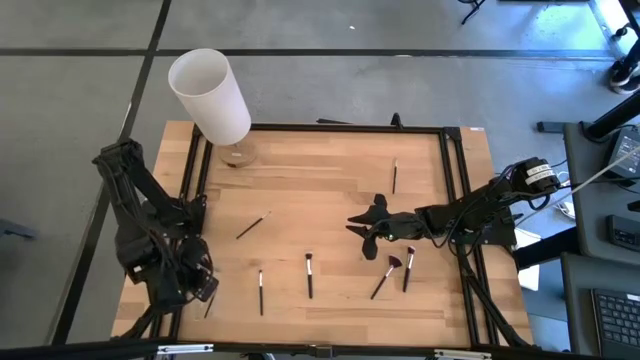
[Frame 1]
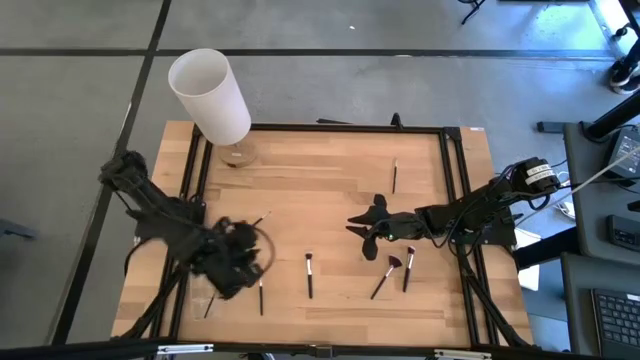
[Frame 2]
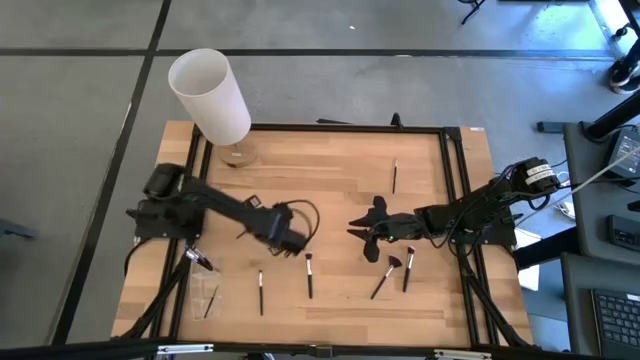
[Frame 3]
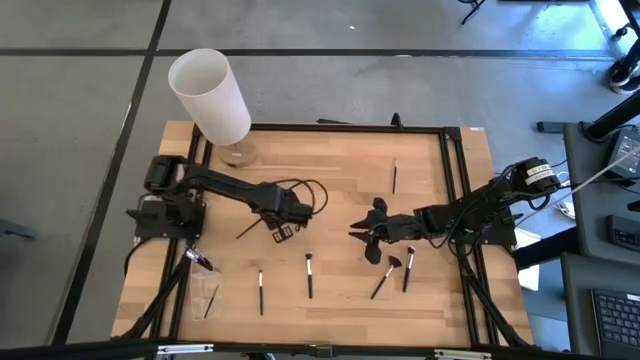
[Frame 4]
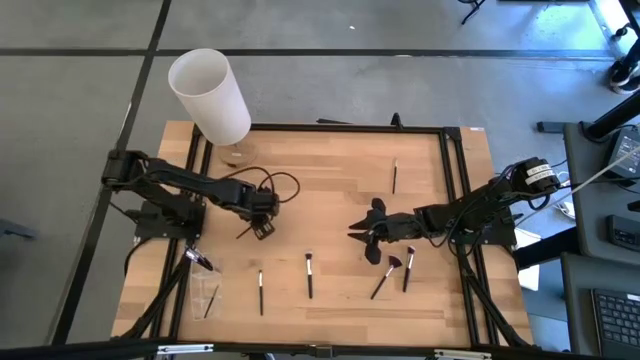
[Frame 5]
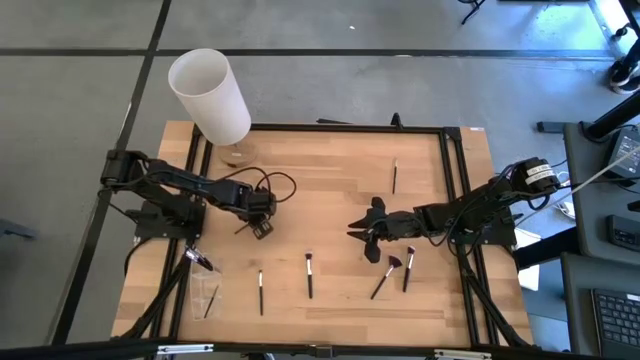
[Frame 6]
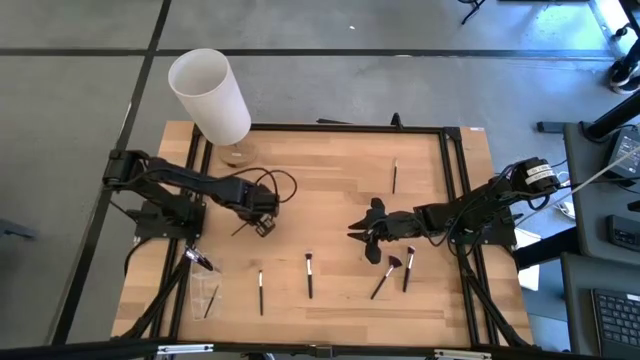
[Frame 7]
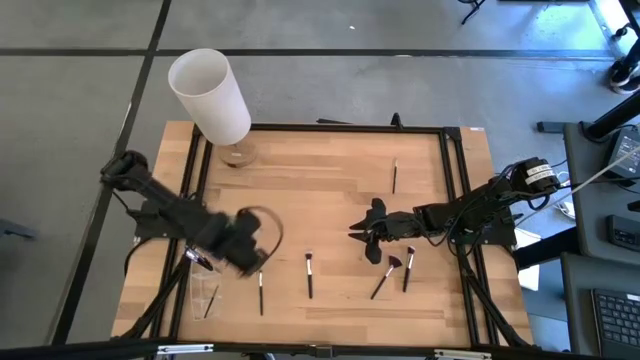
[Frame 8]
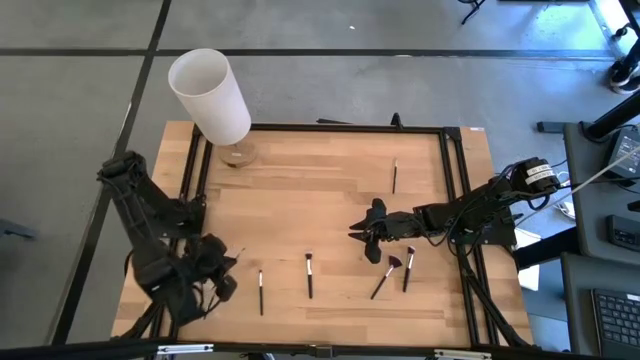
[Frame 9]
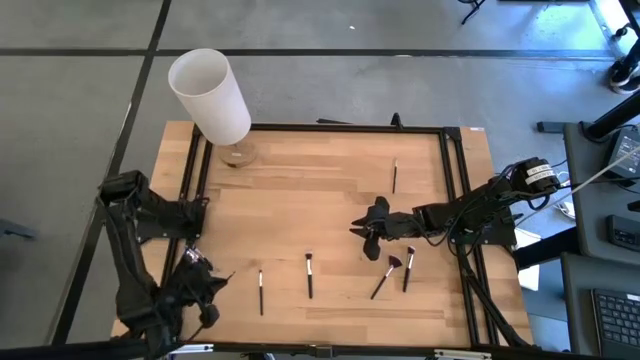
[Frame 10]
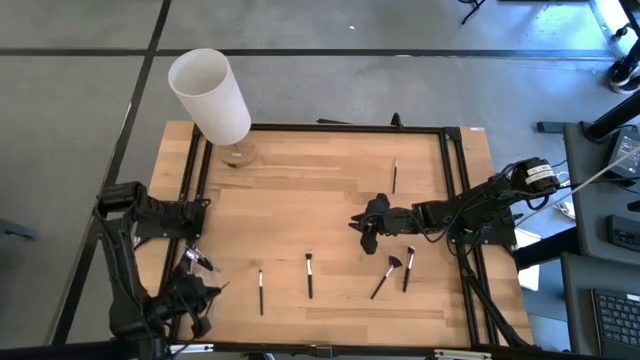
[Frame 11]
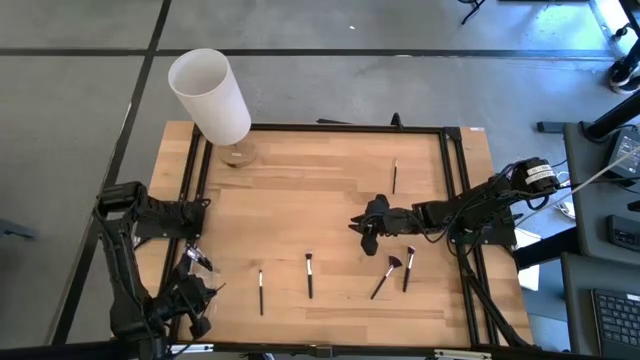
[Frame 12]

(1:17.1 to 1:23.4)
Task: Put items in baskets/containers
Put the eyeshadow brush into the transparent organizer

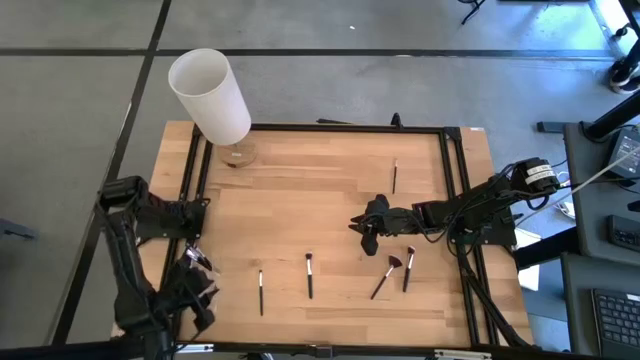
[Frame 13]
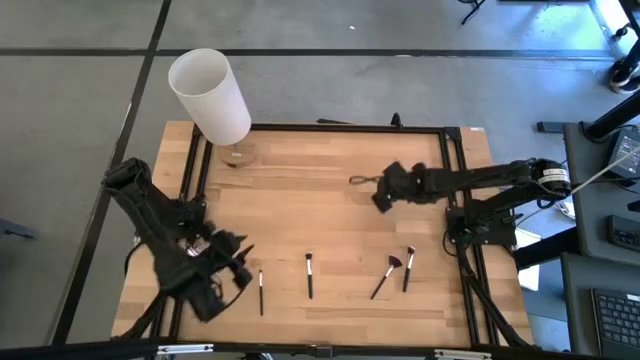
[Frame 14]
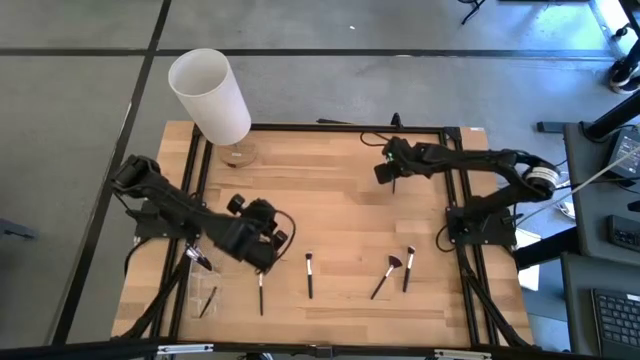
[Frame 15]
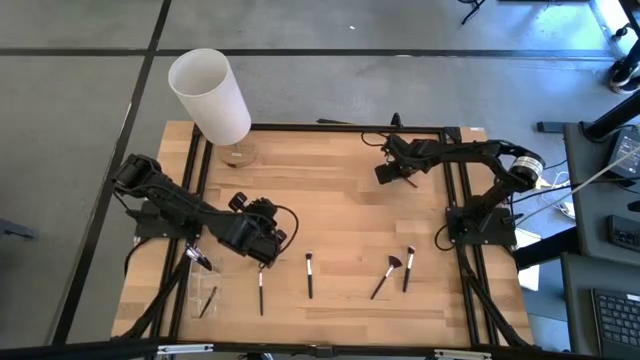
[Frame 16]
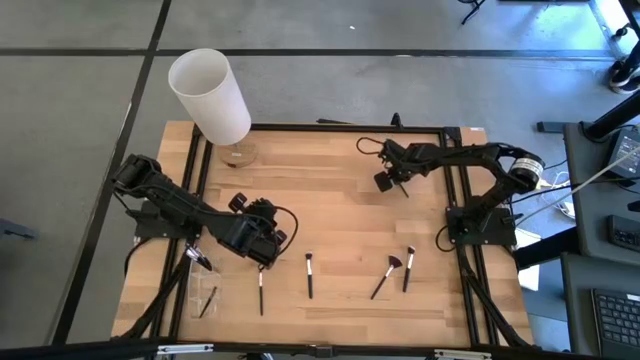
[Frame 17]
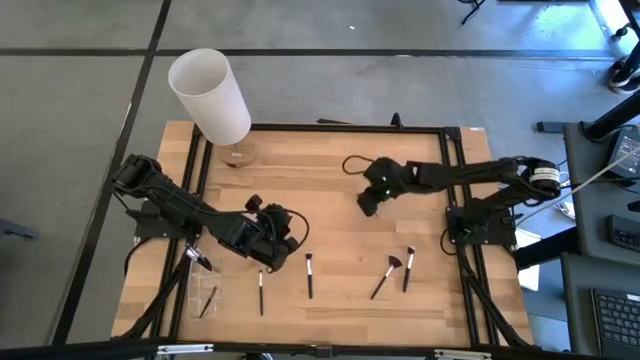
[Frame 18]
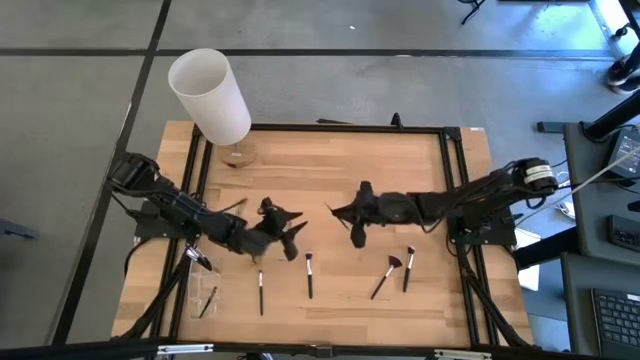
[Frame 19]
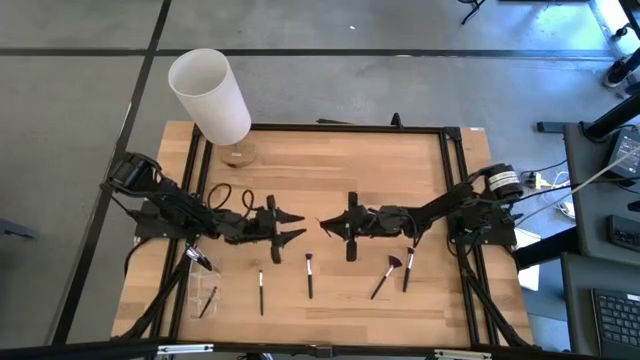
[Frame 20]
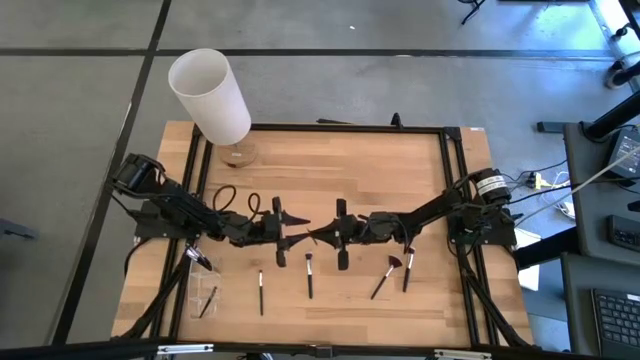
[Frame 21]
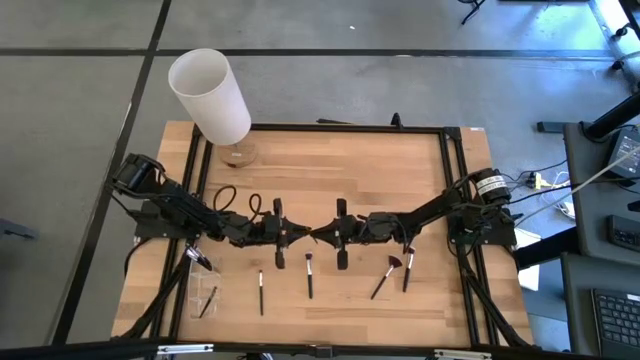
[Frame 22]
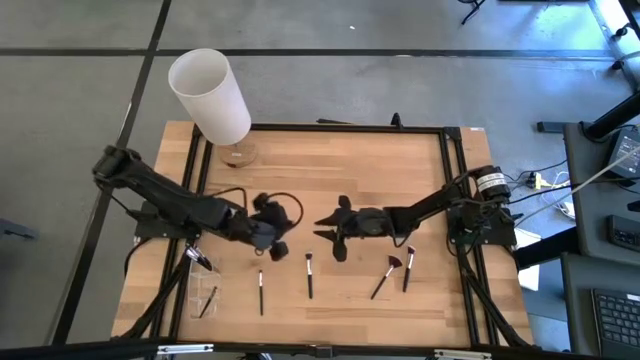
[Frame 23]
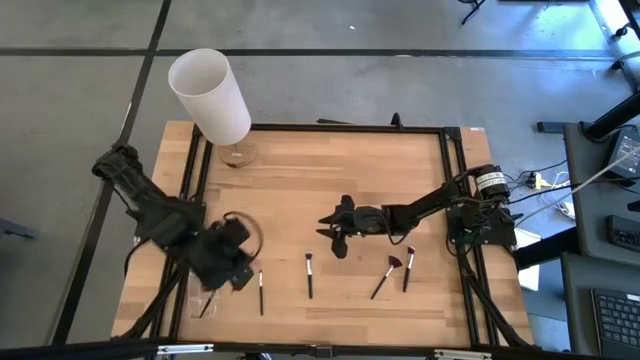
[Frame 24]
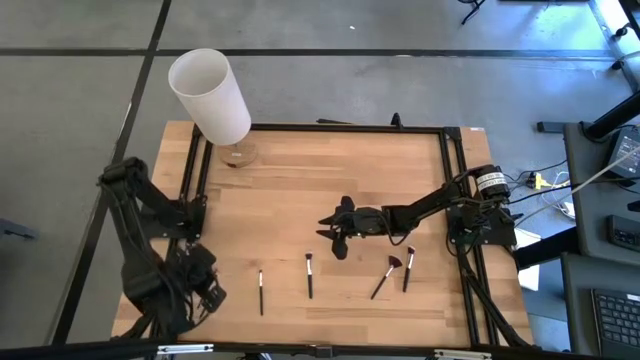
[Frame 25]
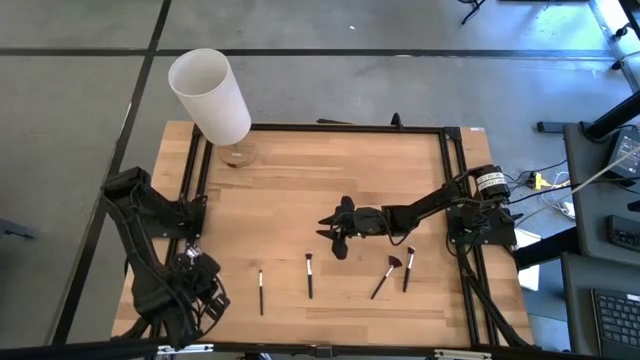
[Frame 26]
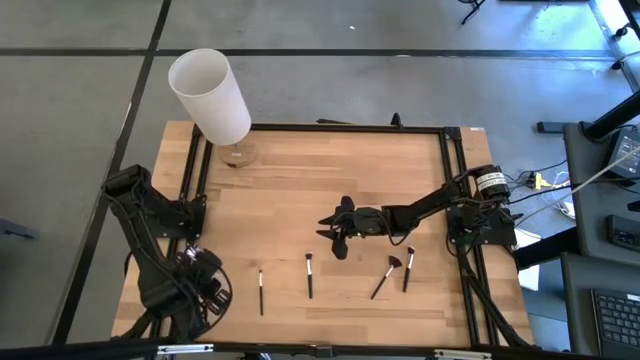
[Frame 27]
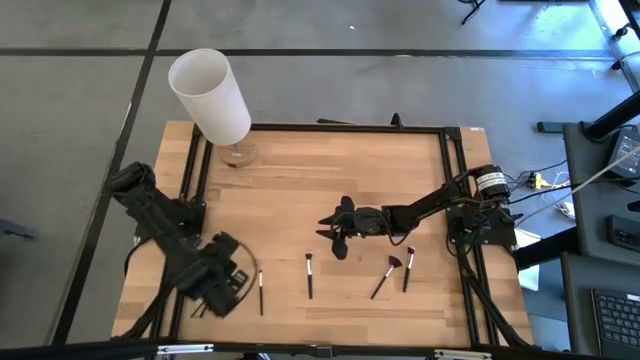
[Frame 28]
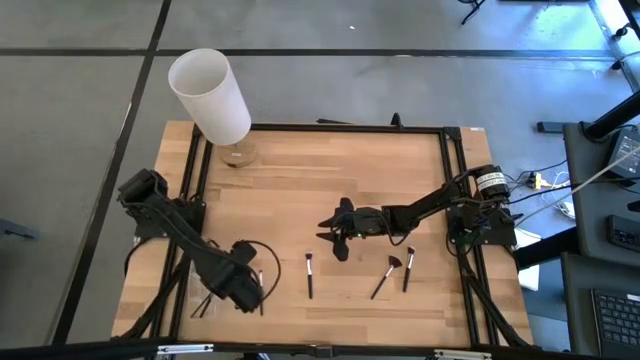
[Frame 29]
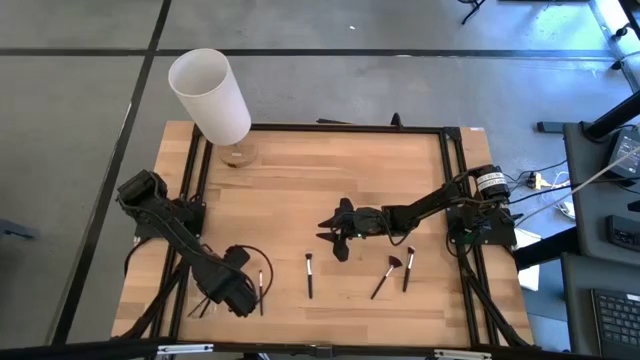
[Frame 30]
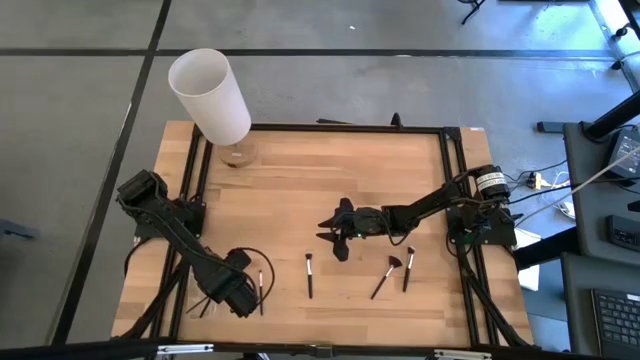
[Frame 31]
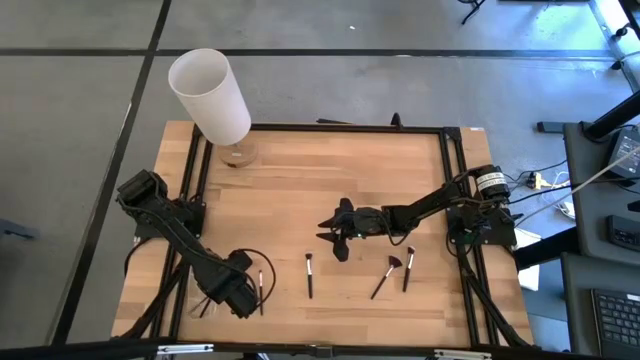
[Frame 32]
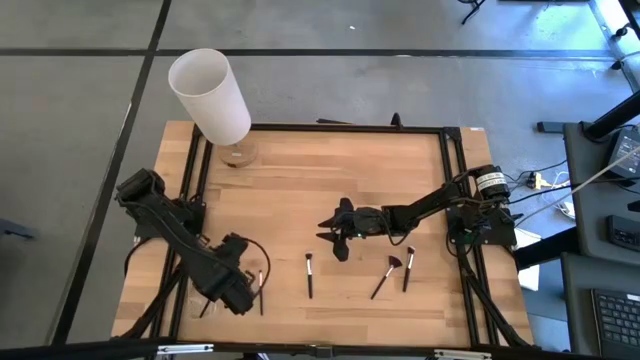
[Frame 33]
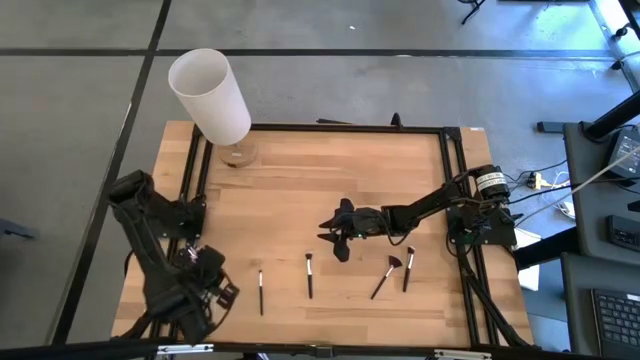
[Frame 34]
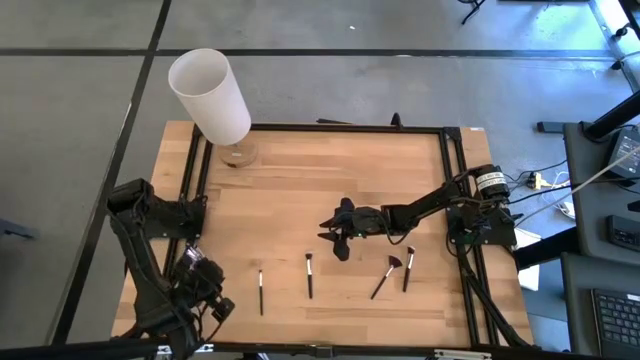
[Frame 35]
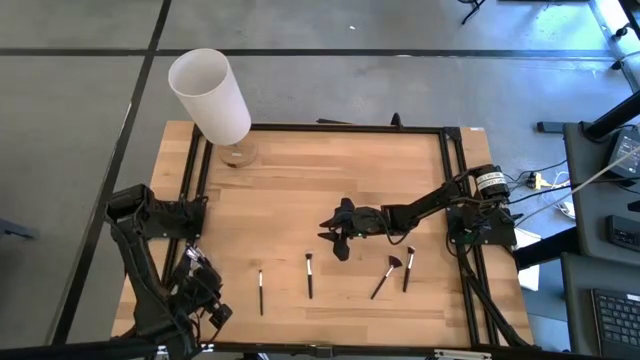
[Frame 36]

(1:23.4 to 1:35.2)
Put the eyeshadow brush into the transparent organizer

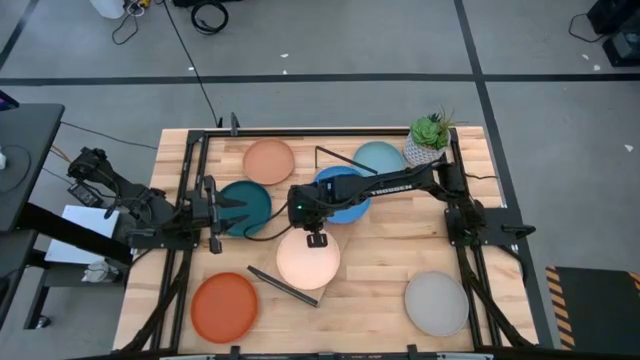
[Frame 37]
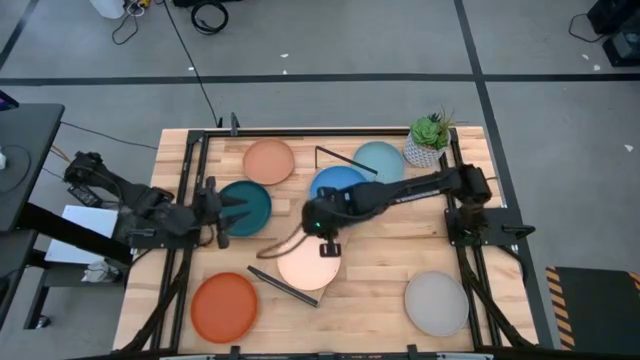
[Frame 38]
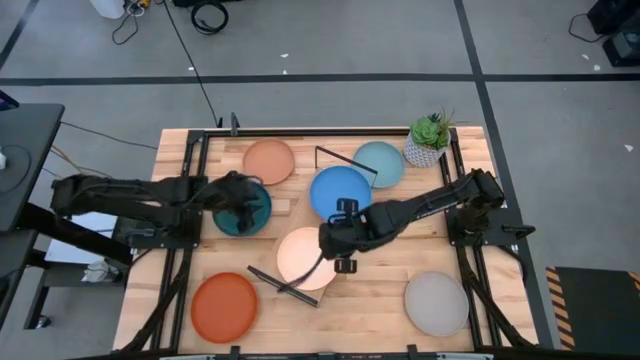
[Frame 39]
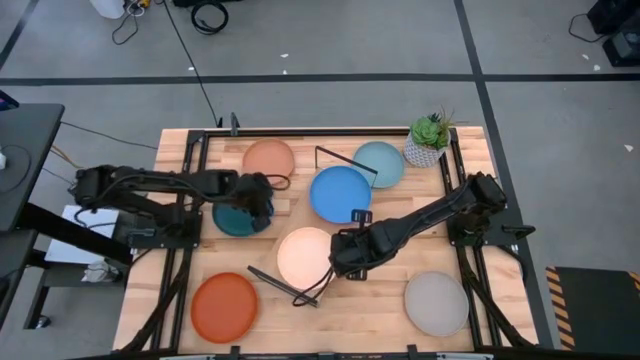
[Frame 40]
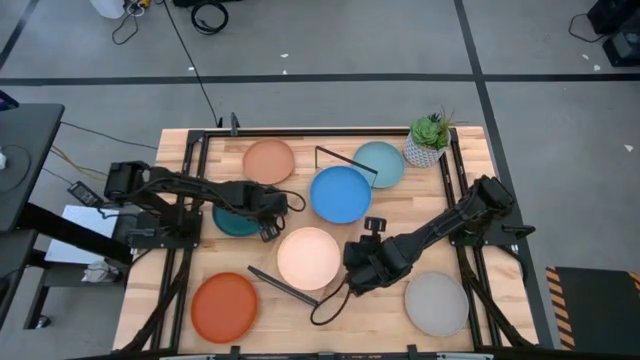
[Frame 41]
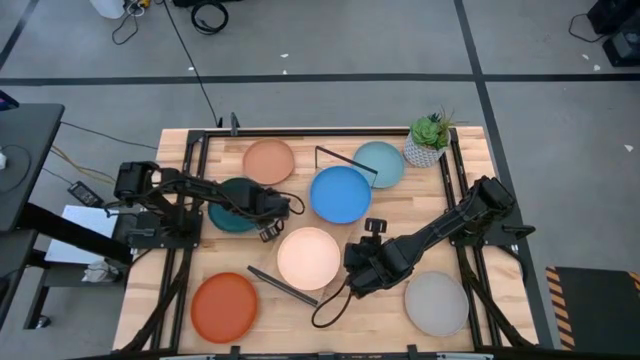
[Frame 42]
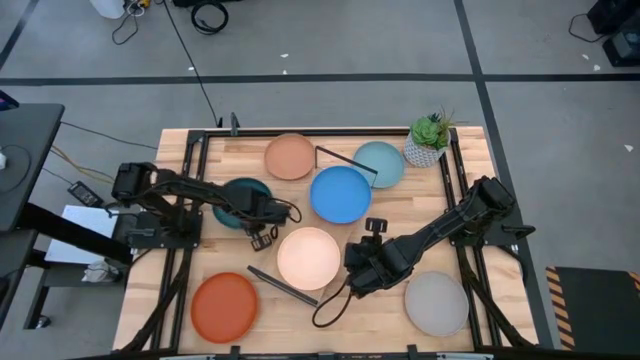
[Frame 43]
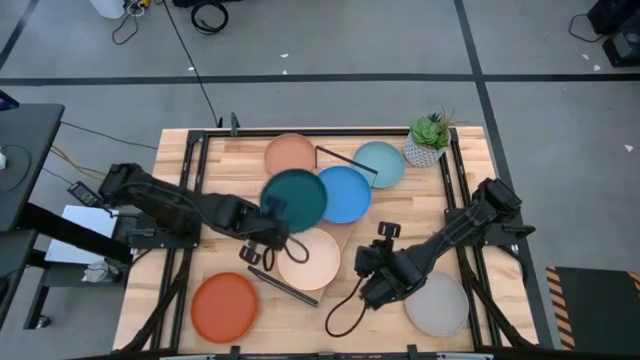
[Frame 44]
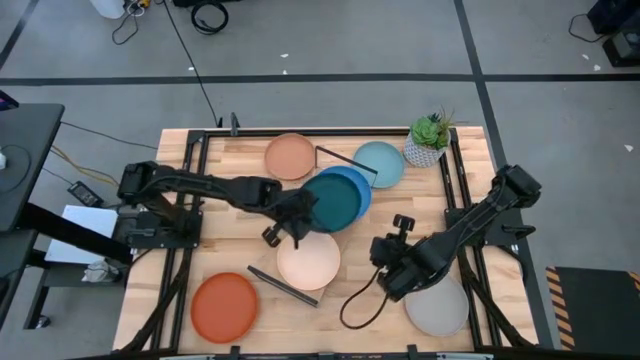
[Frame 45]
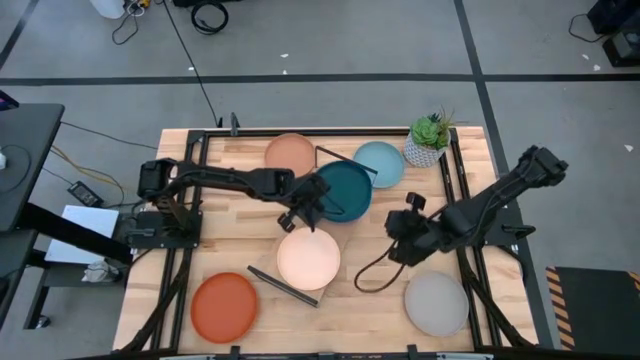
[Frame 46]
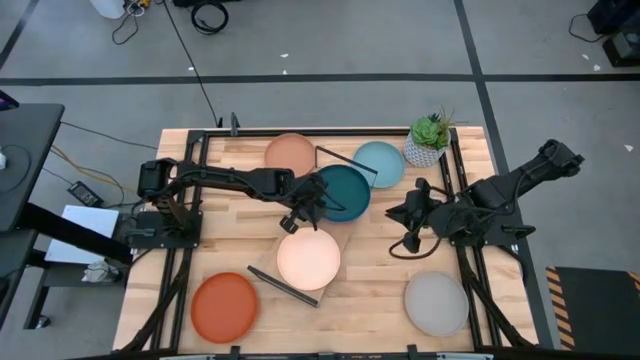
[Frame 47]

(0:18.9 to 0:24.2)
Task: Place and stack plates onto a shelf
Stack the dark blue plate on top of the blue plate on the shelf
